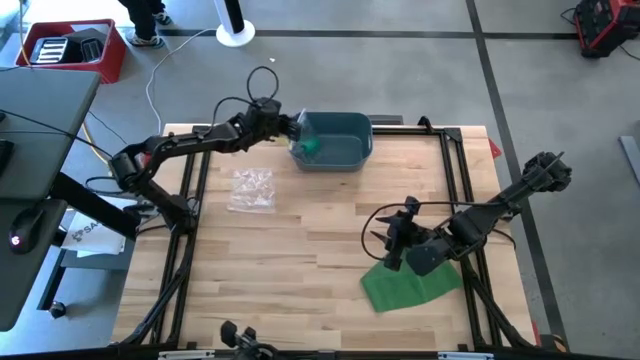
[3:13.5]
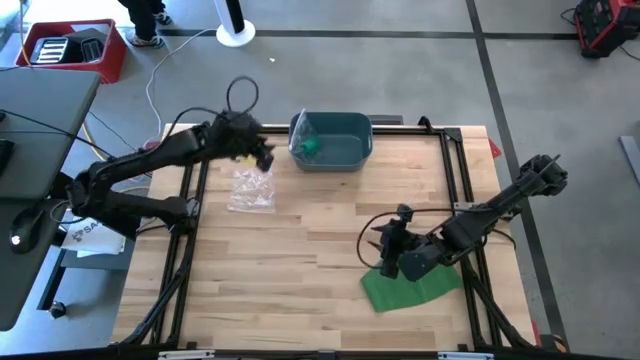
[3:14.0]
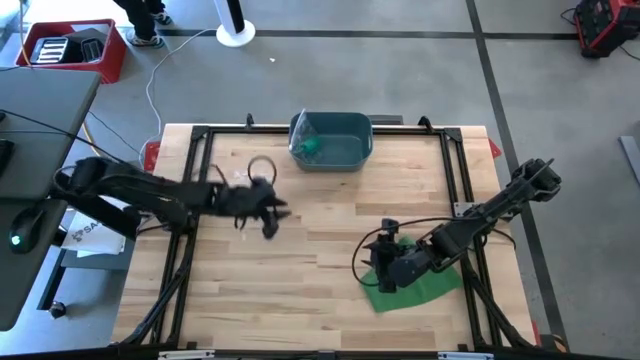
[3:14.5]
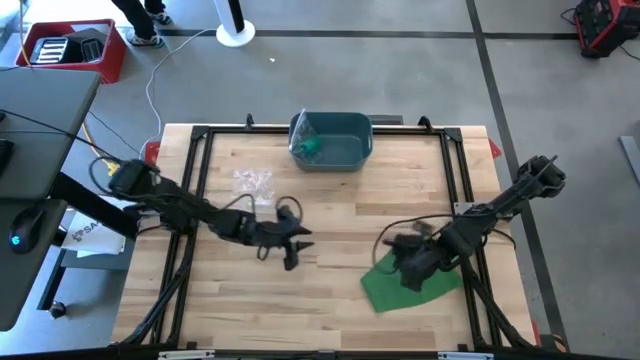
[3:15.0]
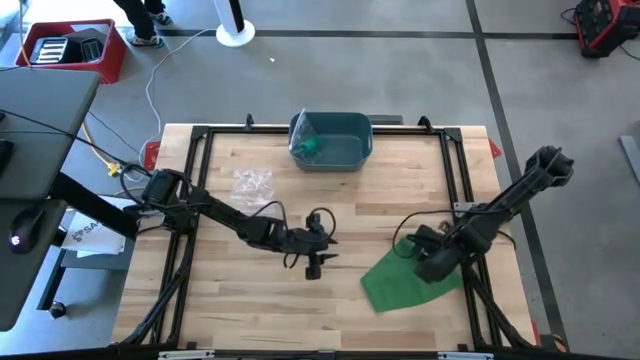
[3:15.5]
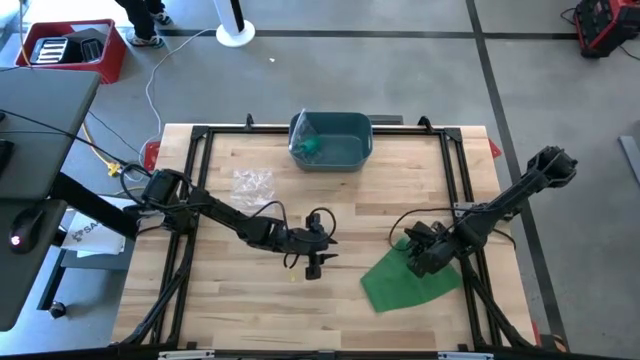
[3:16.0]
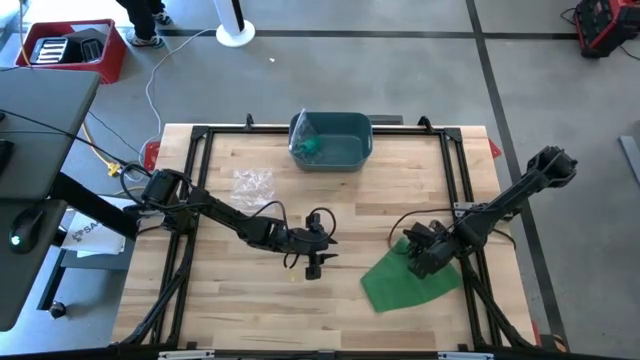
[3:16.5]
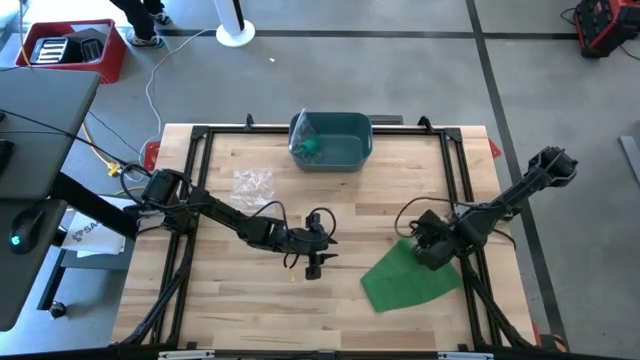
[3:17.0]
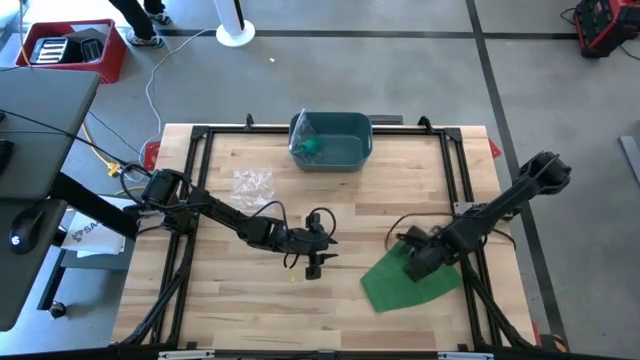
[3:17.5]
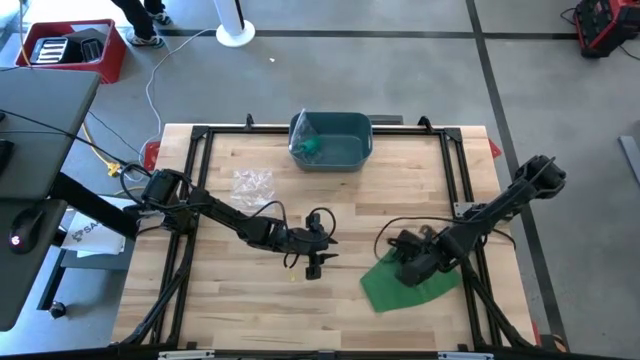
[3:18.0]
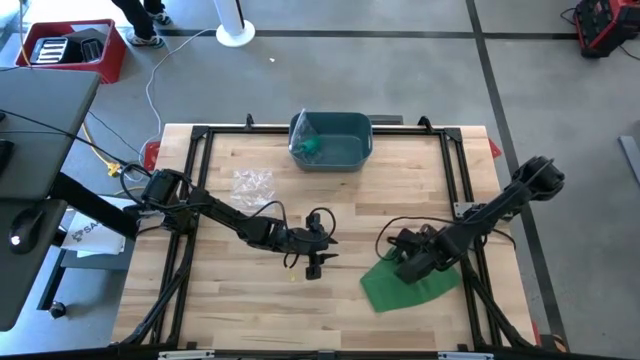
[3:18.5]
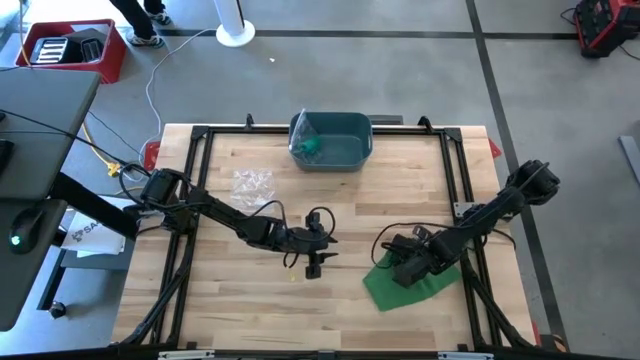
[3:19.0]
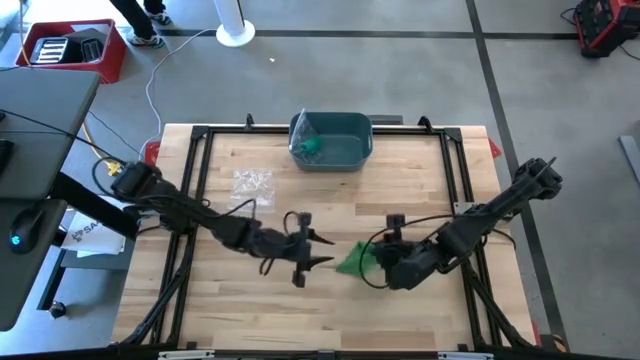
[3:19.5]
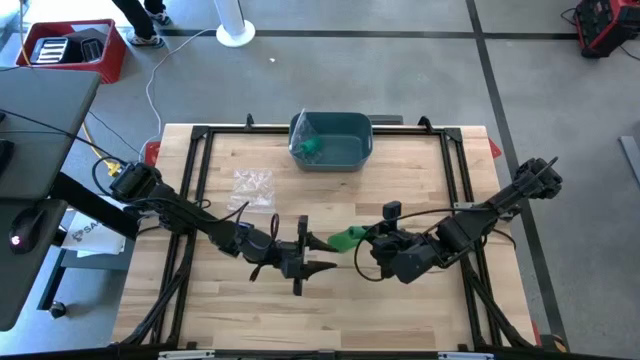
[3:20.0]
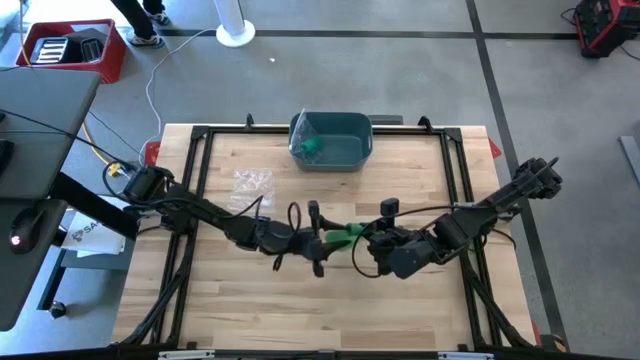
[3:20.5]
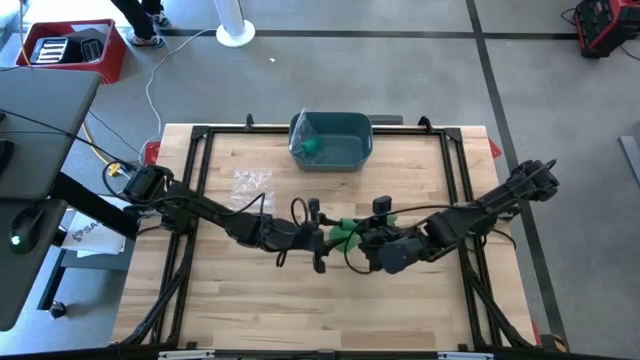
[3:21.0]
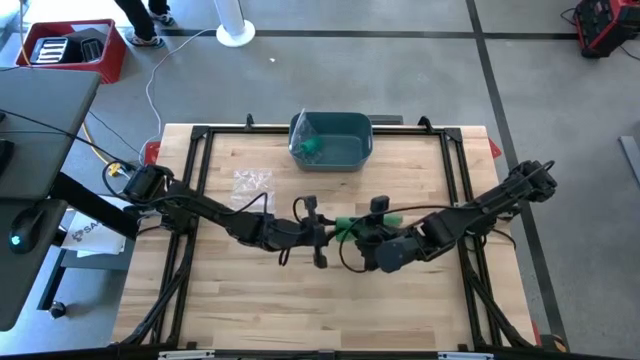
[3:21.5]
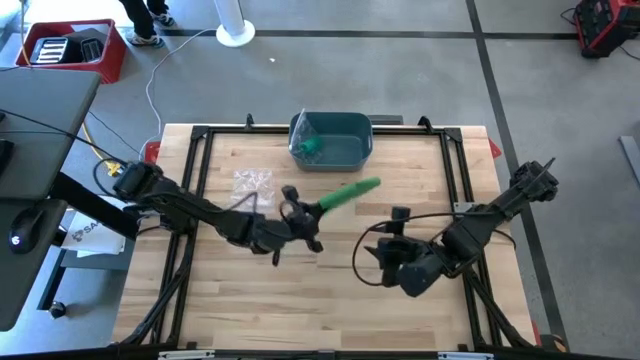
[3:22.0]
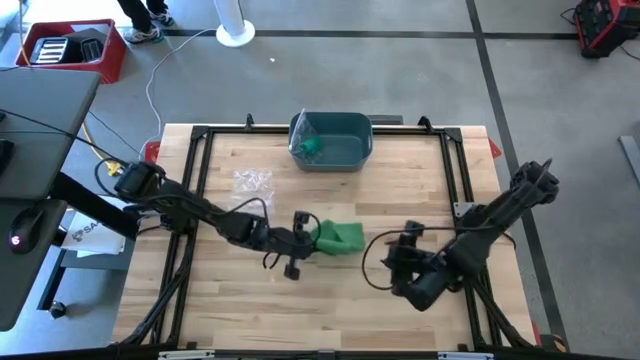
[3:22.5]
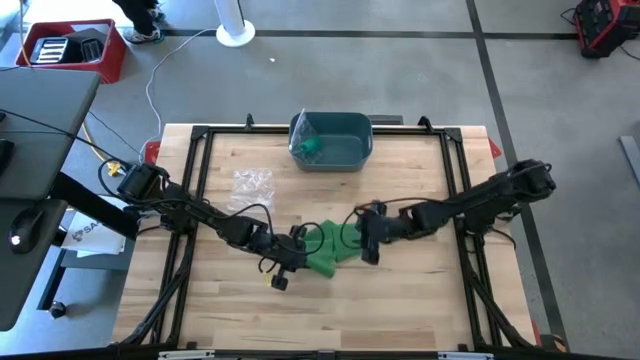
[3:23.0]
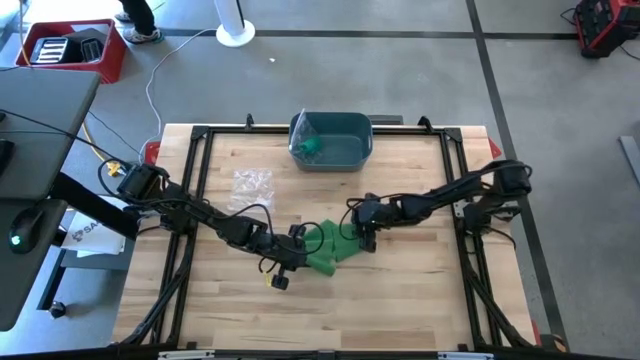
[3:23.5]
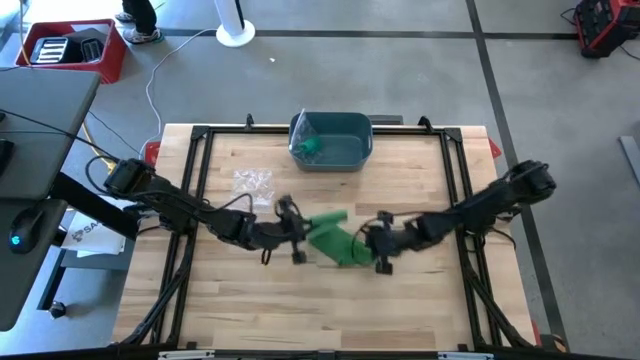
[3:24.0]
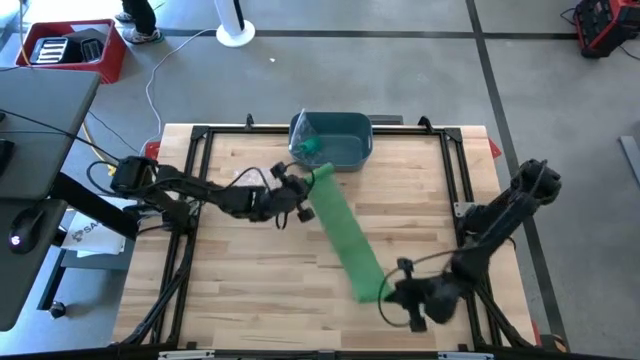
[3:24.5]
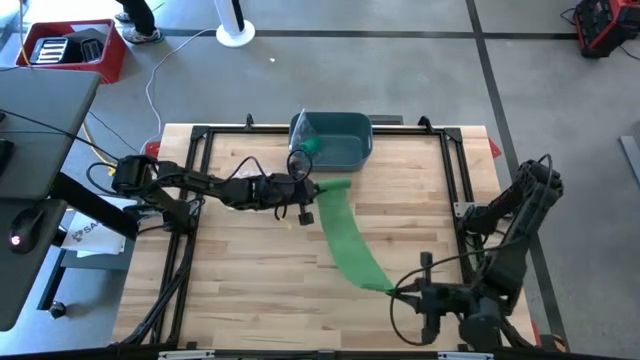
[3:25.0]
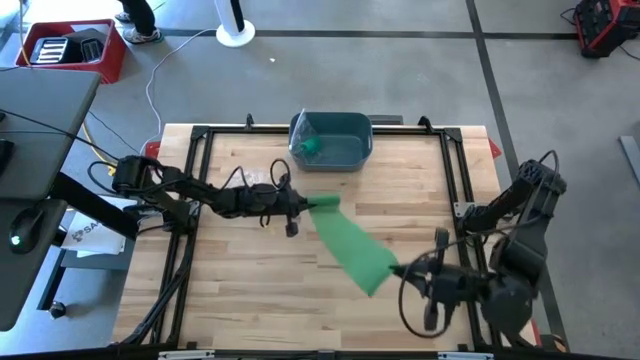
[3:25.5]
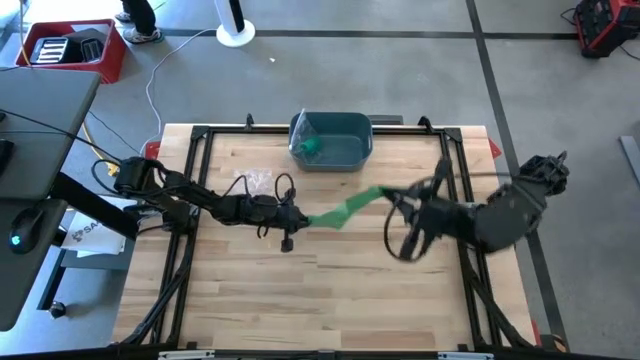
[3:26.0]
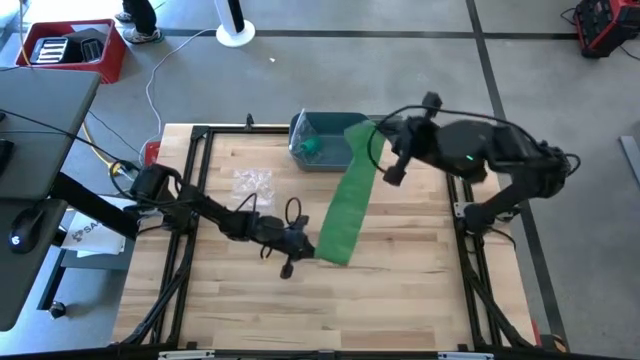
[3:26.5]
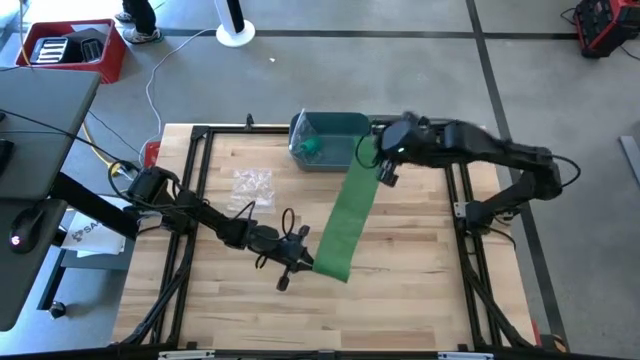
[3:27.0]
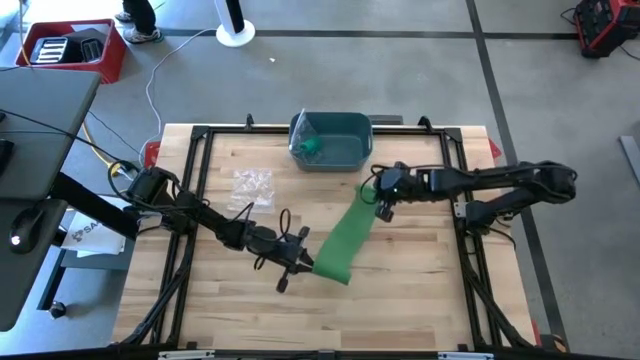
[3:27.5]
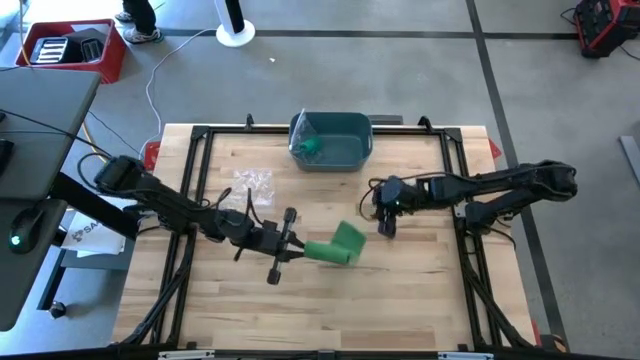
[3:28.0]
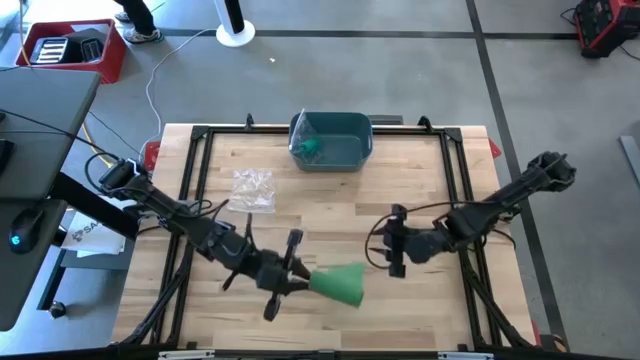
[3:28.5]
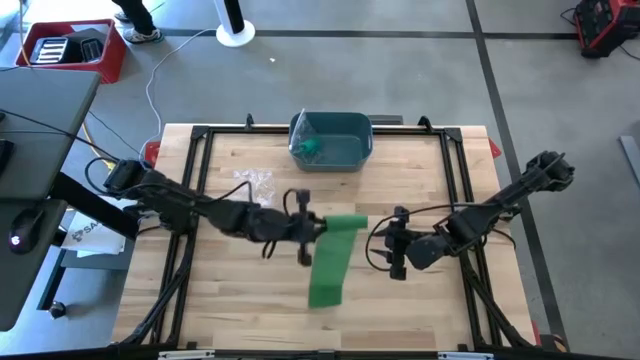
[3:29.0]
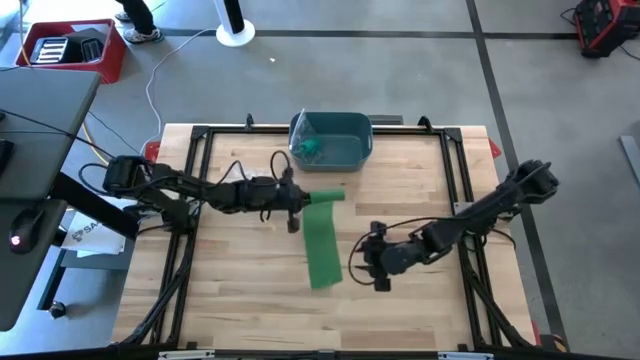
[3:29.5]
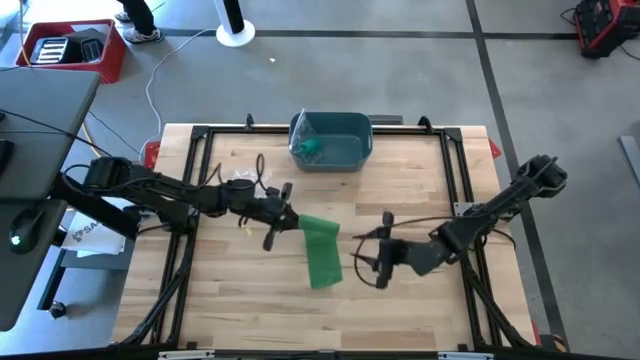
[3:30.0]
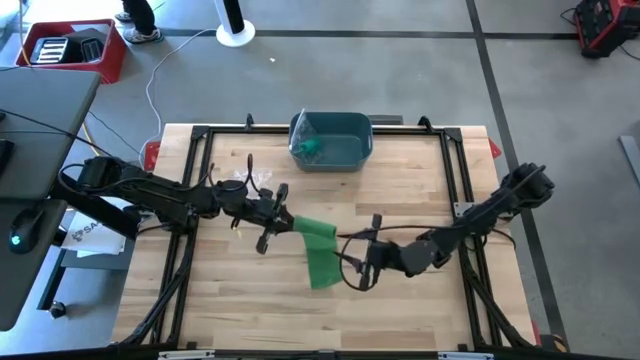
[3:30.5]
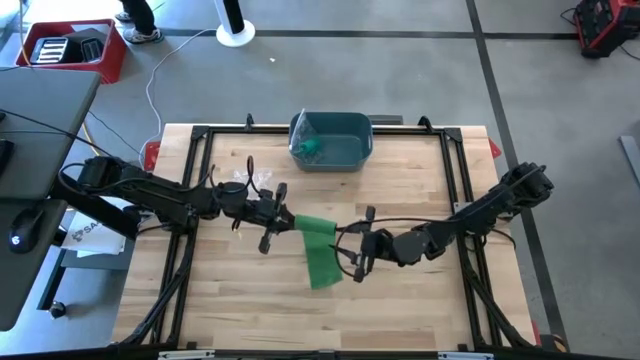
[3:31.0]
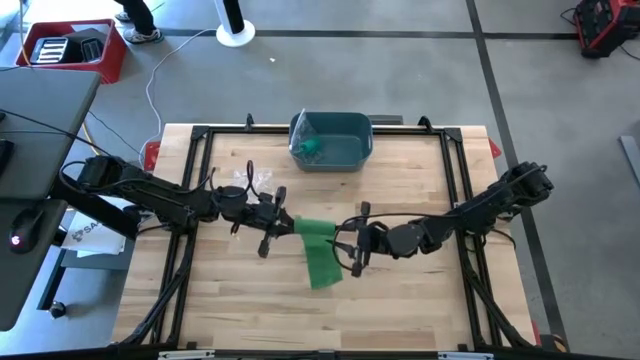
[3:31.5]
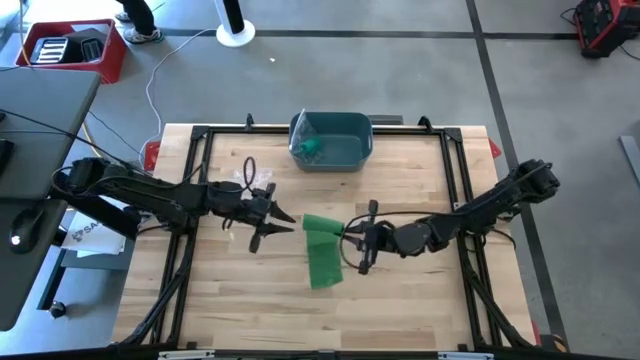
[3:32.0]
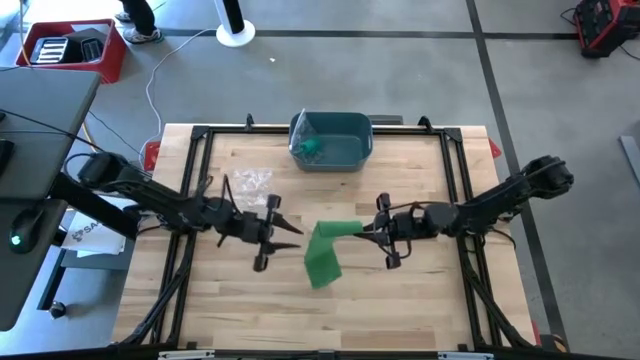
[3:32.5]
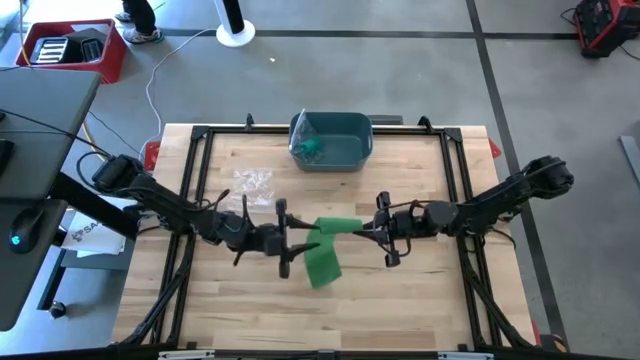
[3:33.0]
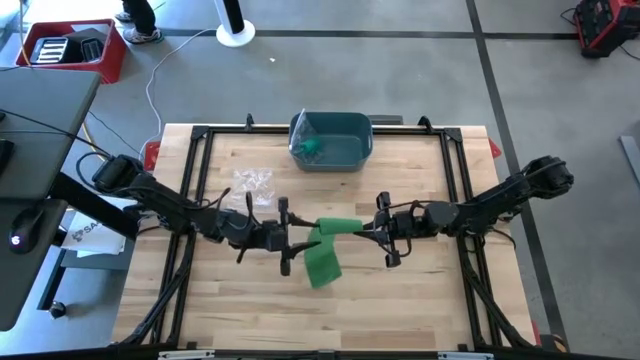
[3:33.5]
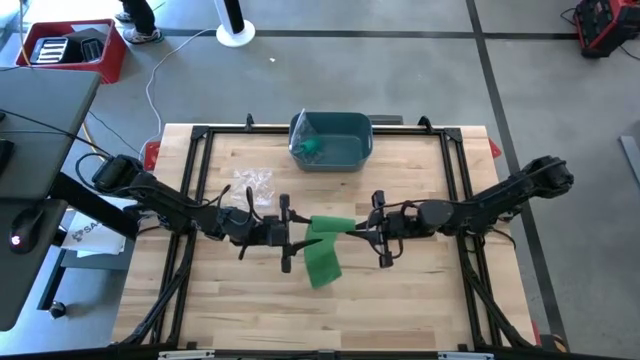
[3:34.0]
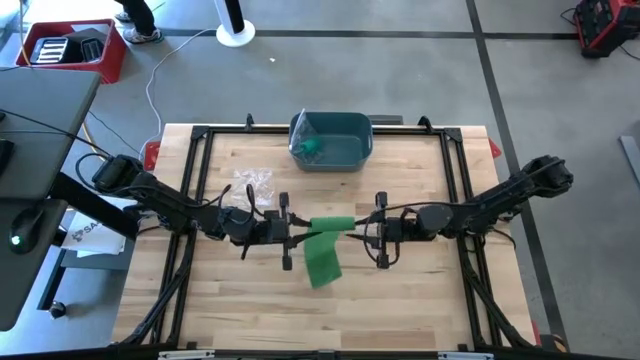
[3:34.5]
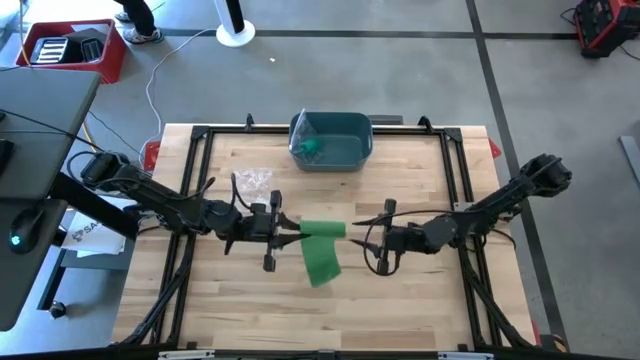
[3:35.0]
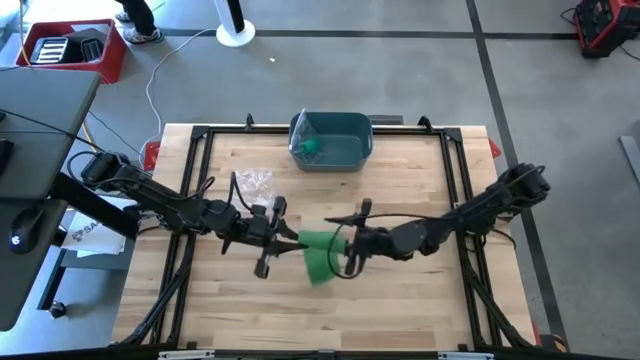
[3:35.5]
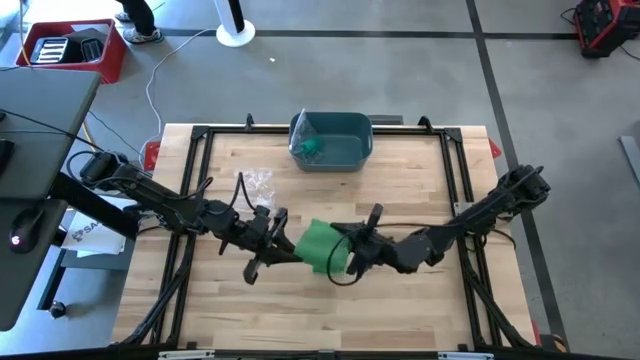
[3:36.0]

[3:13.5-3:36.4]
Task: Roll bandage
Roll the green bandage
